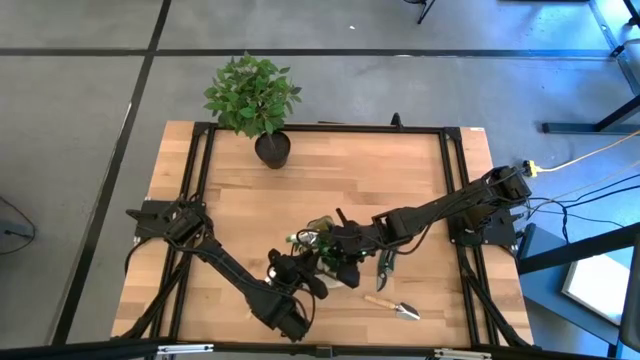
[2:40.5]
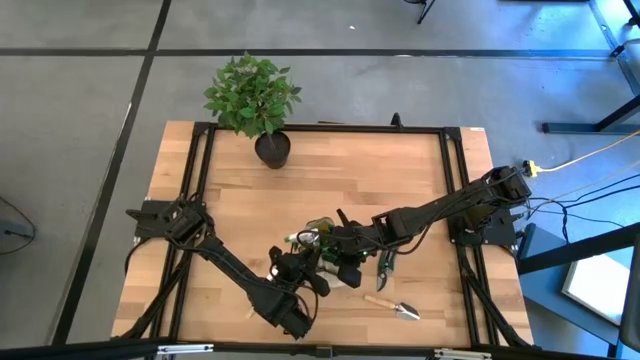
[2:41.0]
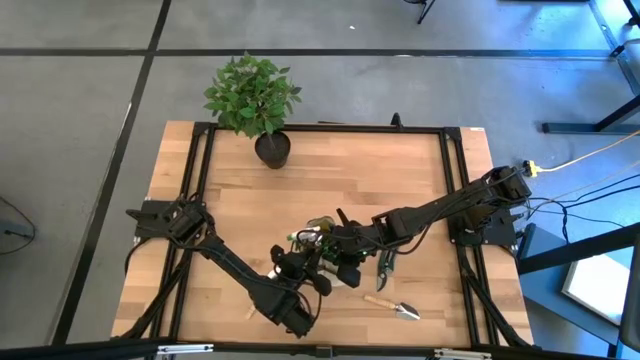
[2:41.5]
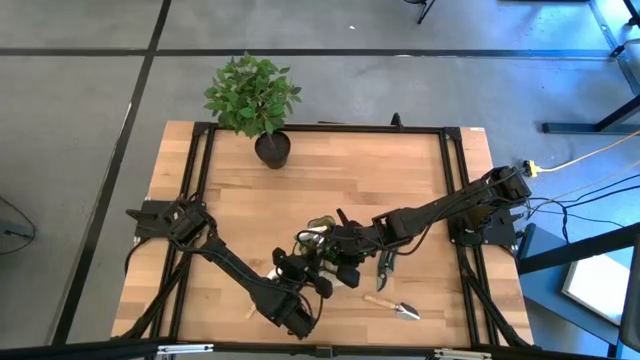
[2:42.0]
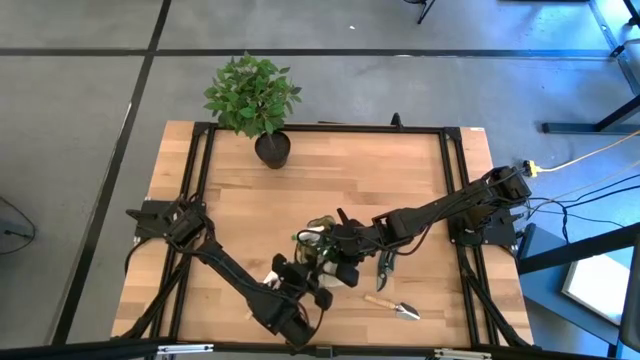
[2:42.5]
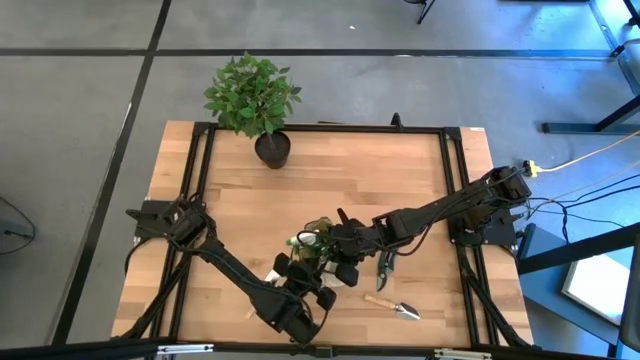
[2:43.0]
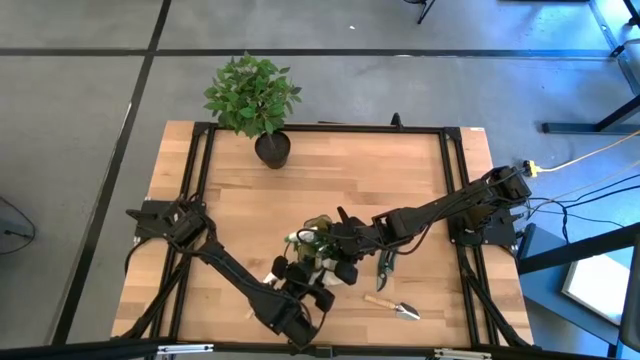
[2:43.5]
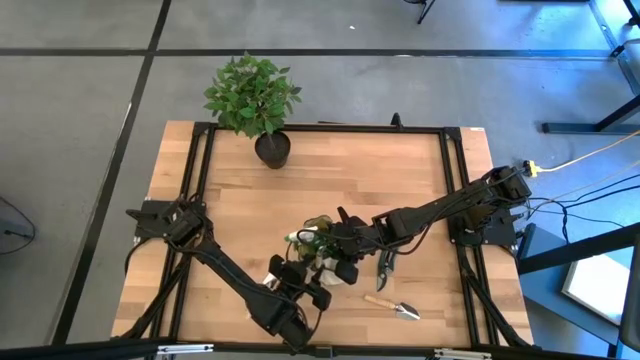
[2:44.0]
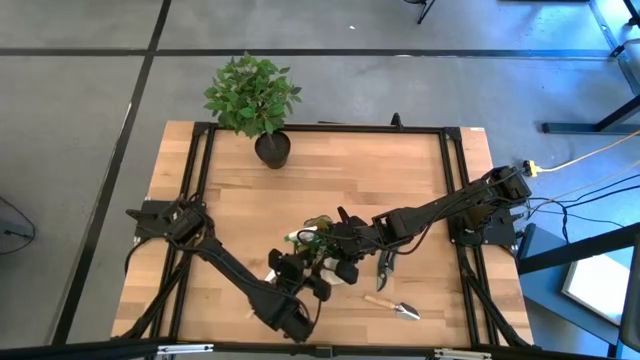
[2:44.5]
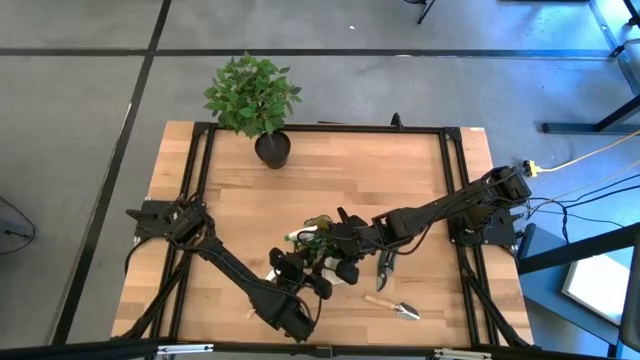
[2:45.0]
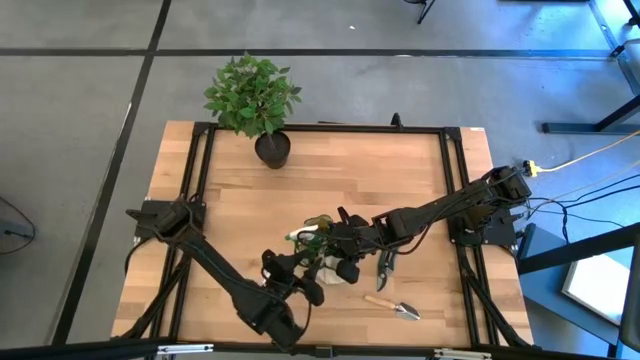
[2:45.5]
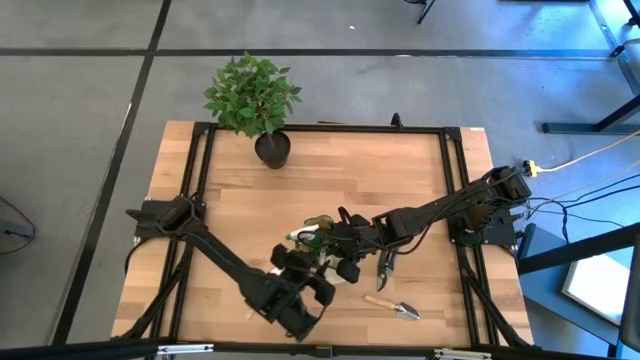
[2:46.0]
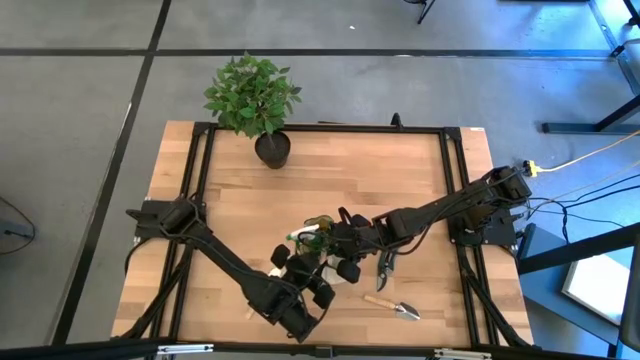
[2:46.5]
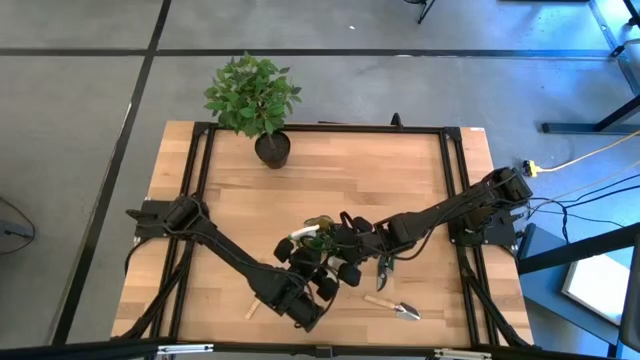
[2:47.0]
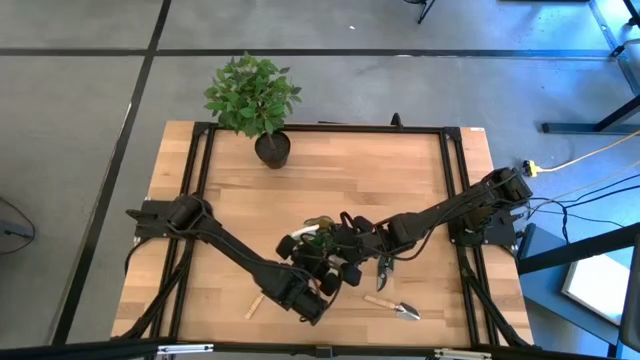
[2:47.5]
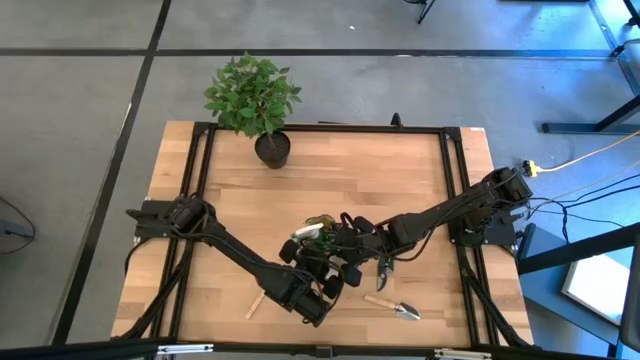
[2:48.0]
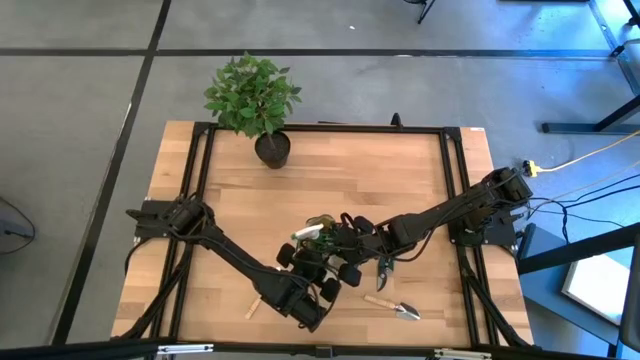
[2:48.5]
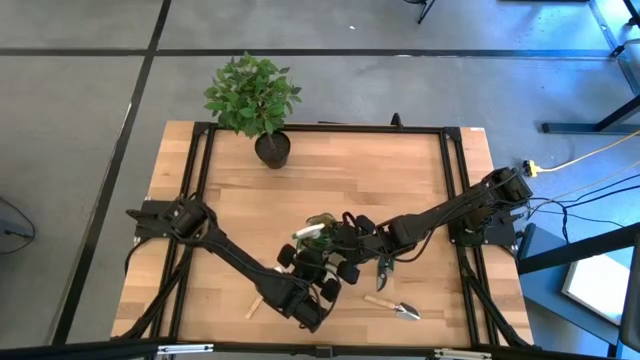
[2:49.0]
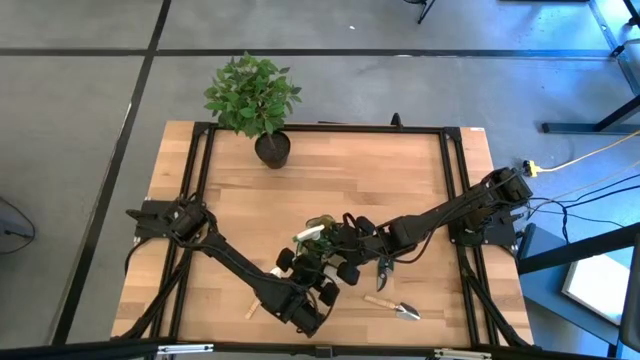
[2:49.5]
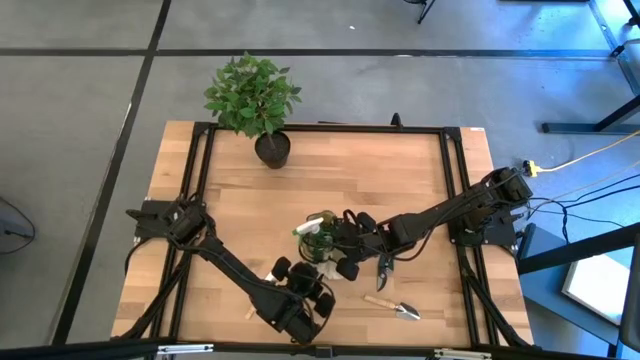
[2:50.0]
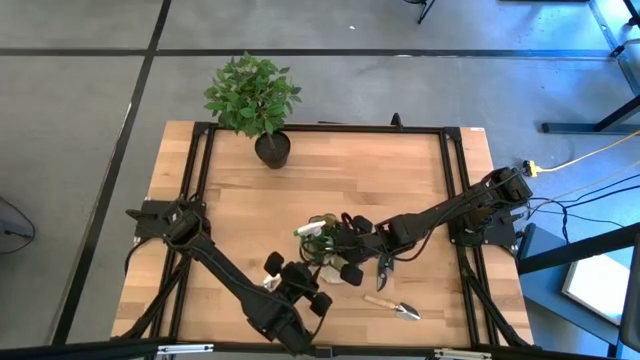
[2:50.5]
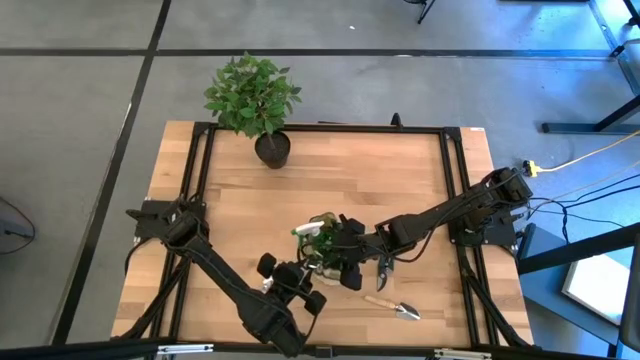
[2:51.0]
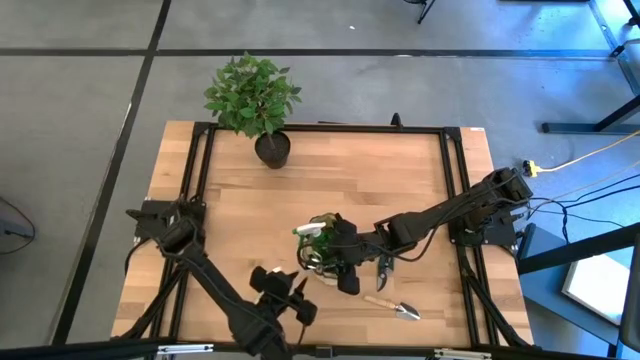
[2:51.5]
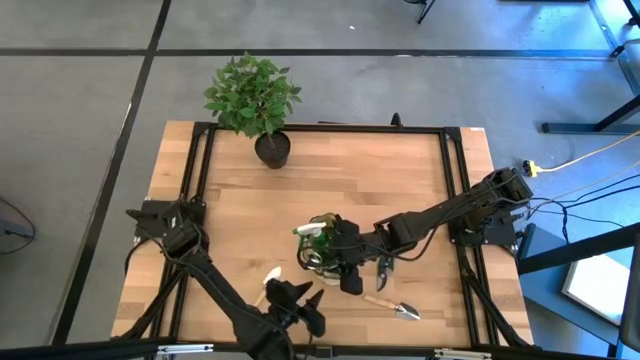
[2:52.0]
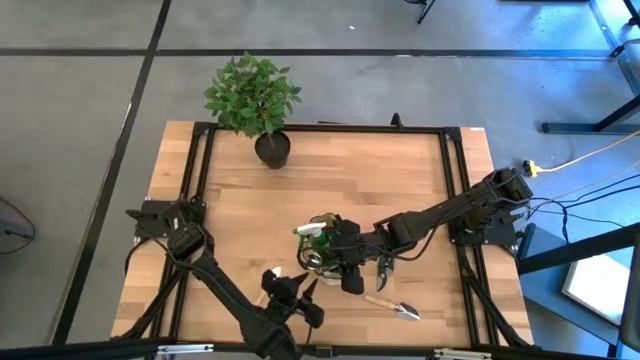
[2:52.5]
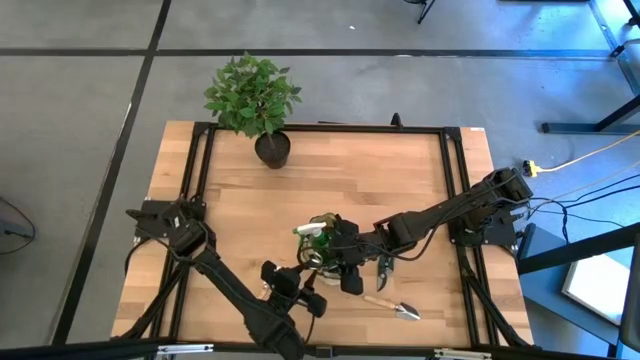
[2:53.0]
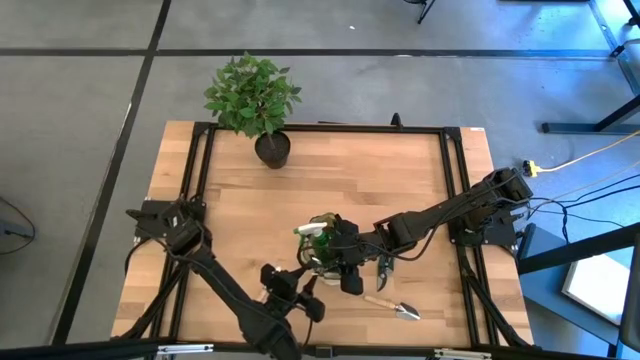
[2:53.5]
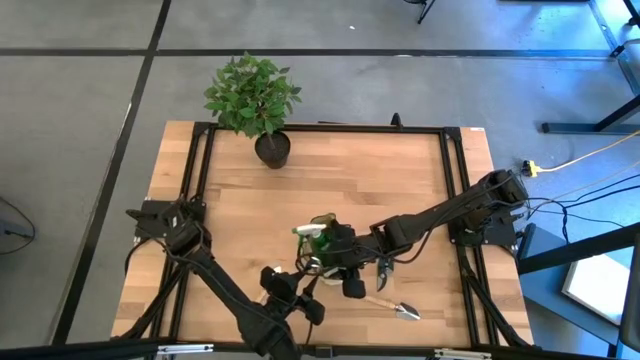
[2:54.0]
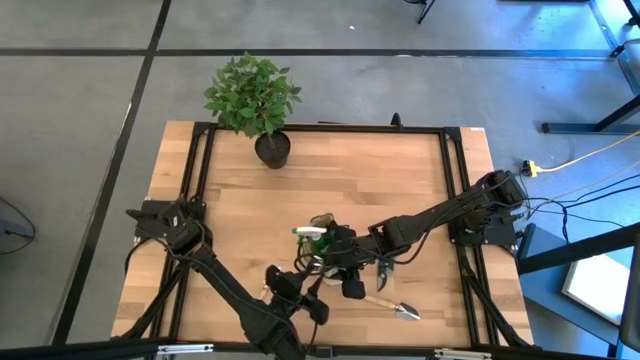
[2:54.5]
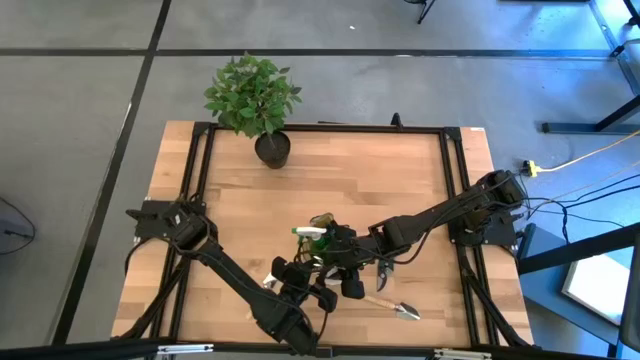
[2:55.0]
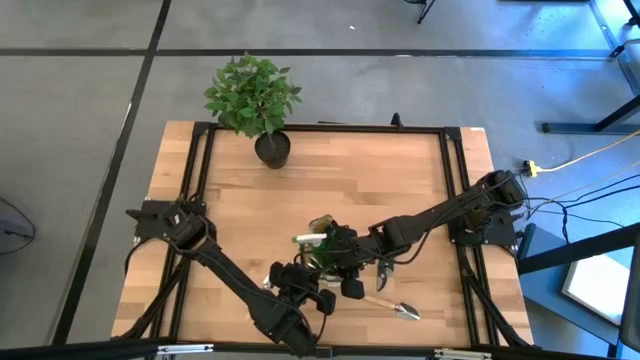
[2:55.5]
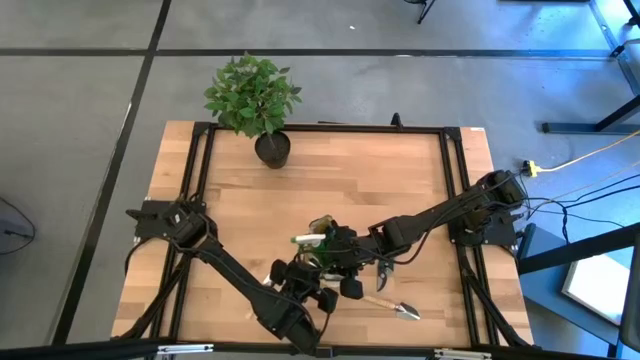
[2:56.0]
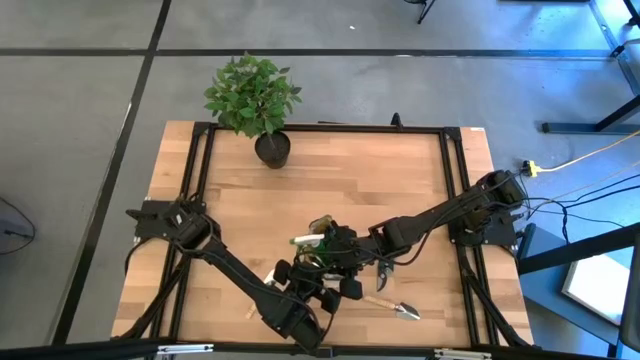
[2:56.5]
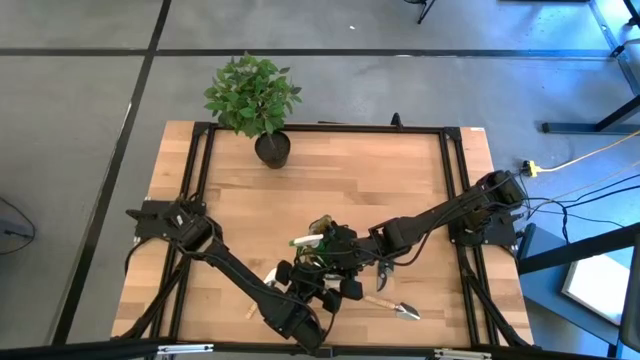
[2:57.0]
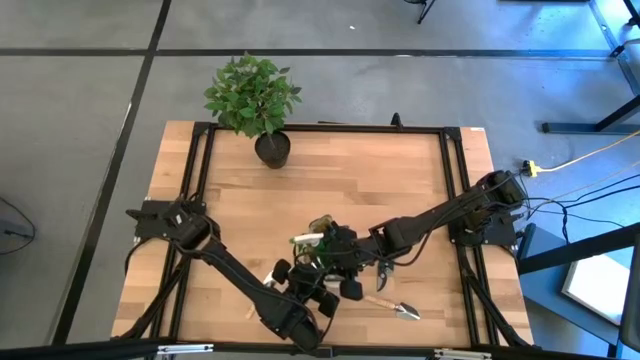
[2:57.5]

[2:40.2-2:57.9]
Task: Pick & Place Garden tools in Gardening bag
Put the brown hand rake into the brown gardening bag

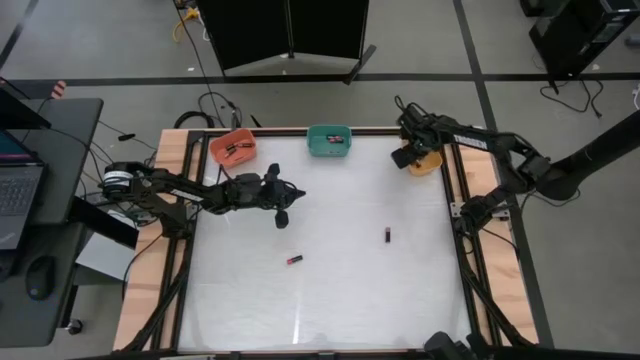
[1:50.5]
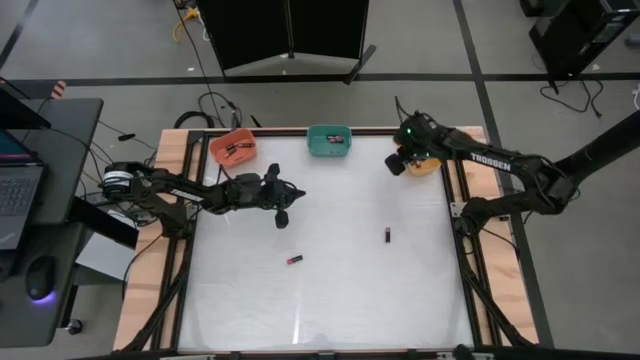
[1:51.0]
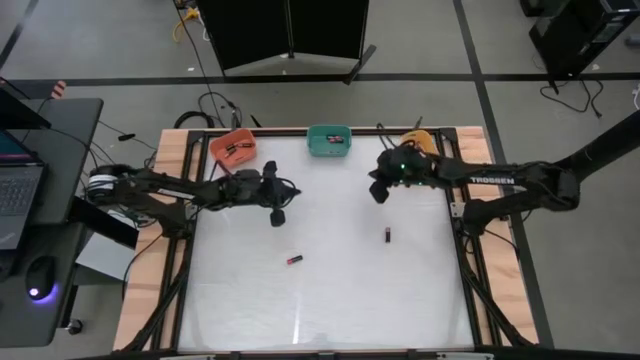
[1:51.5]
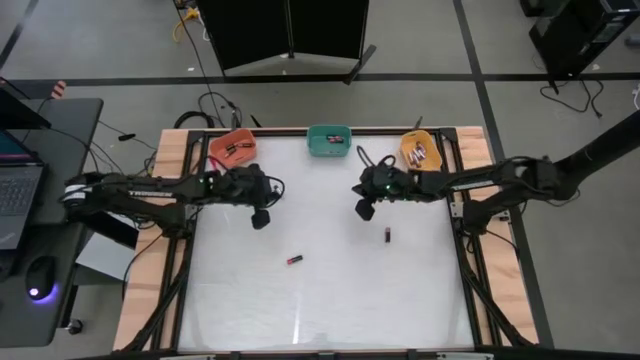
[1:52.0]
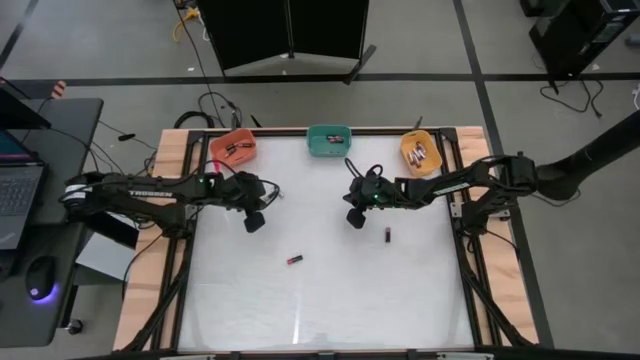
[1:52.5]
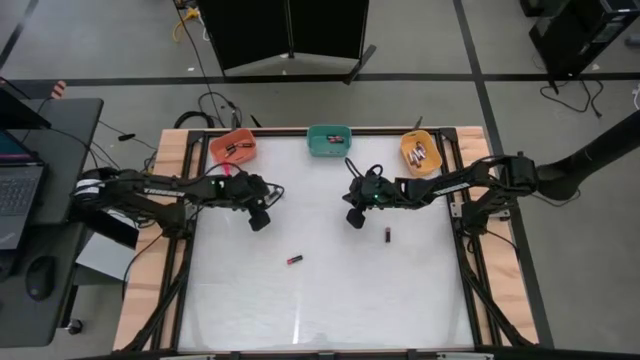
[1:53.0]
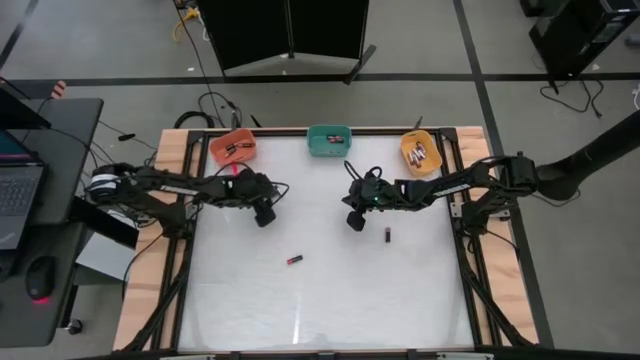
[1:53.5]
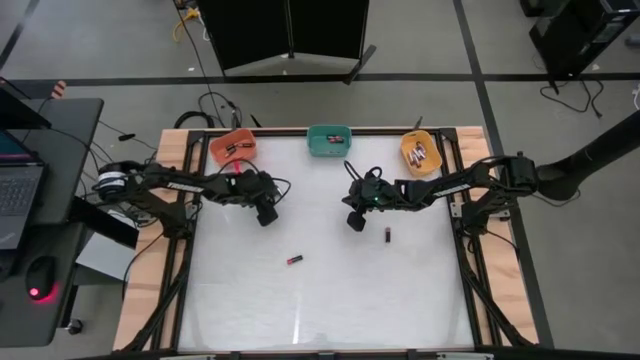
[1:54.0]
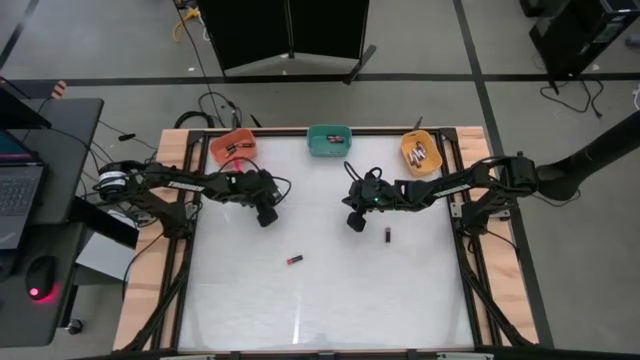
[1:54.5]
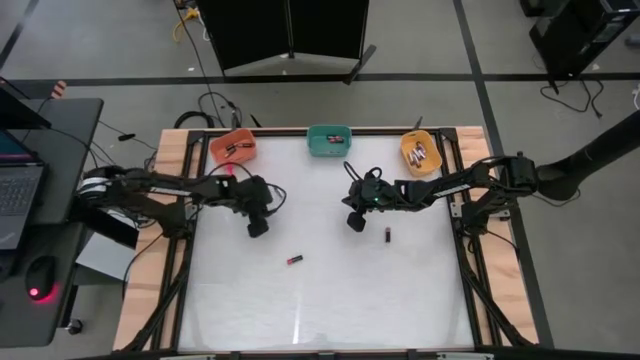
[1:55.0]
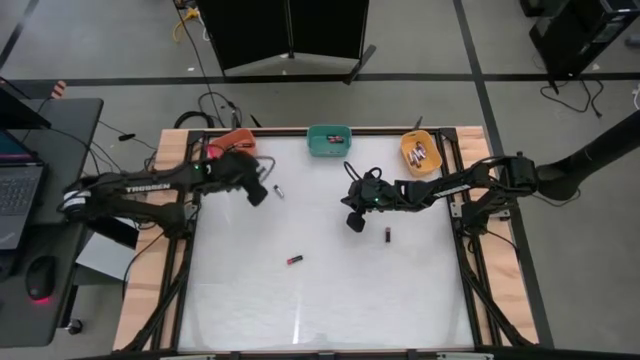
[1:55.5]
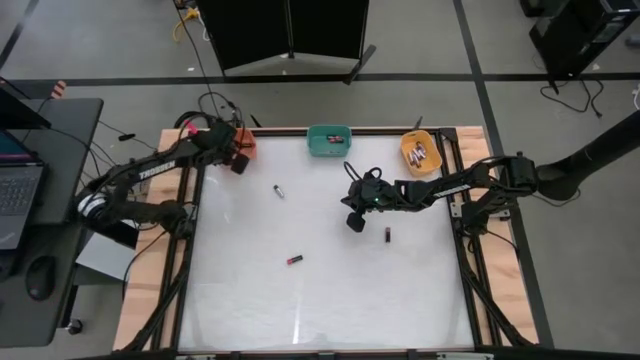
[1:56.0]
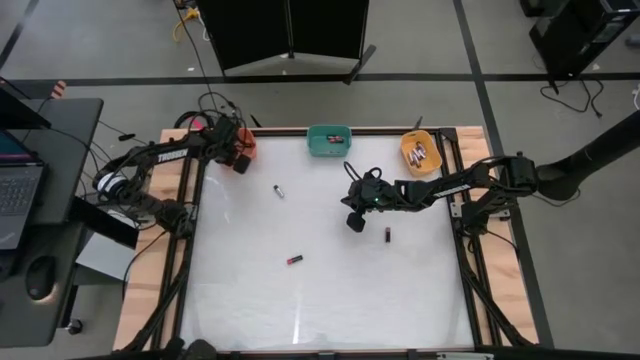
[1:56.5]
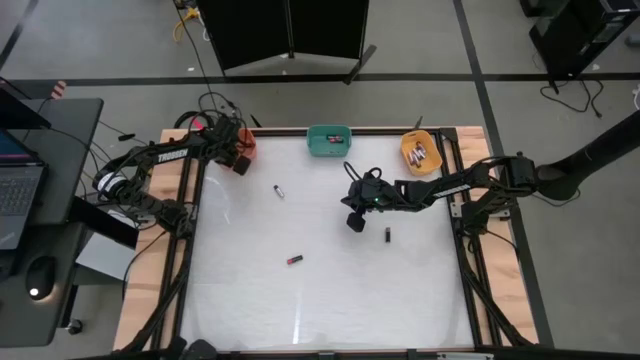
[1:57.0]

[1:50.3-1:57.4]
Task: Sort batteries
Put the brown battery into the orange bin
